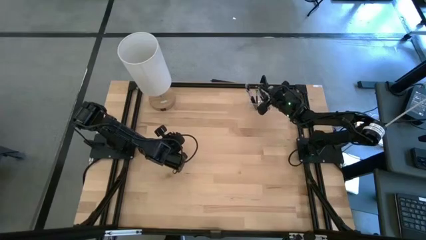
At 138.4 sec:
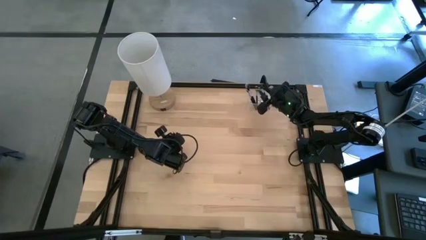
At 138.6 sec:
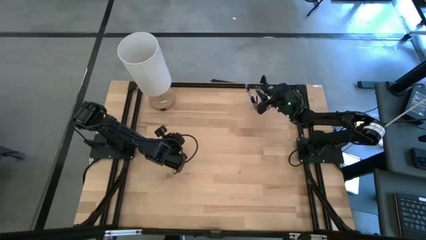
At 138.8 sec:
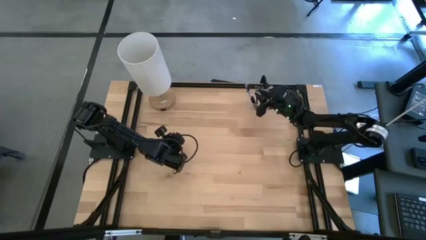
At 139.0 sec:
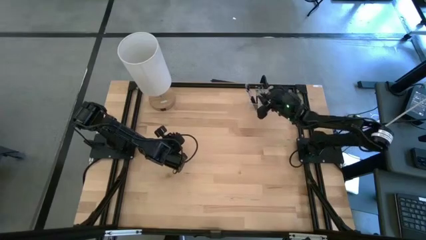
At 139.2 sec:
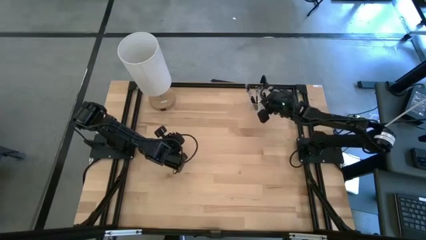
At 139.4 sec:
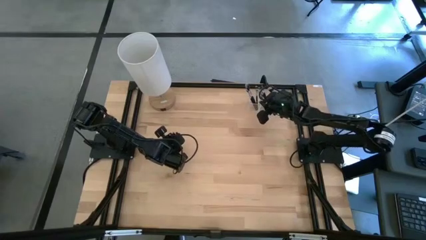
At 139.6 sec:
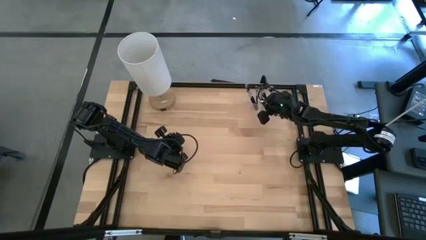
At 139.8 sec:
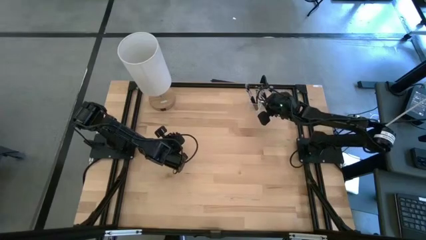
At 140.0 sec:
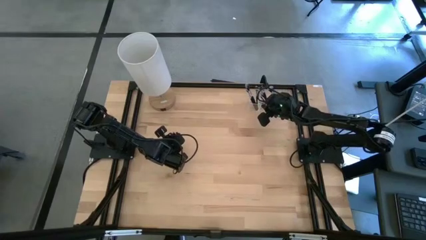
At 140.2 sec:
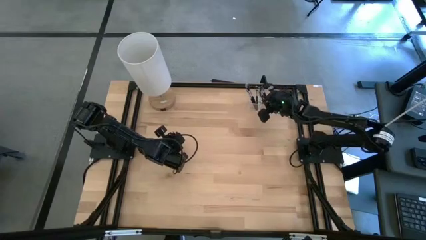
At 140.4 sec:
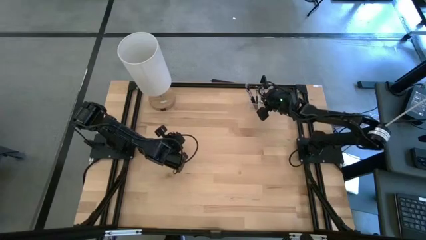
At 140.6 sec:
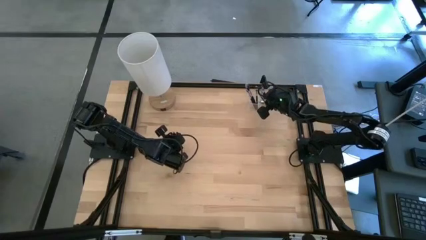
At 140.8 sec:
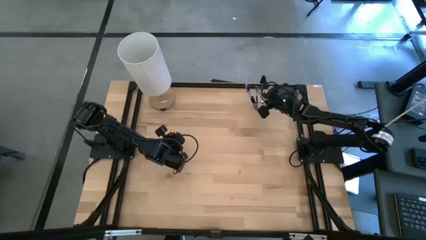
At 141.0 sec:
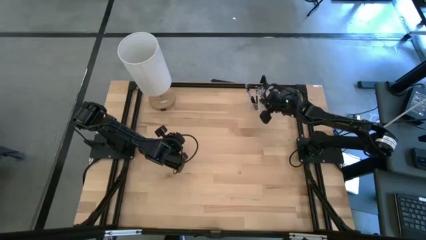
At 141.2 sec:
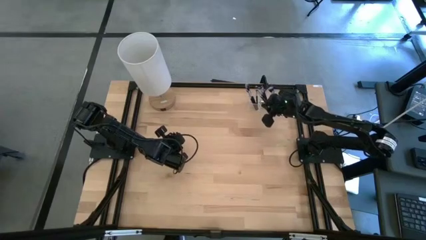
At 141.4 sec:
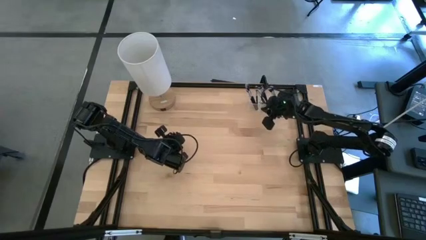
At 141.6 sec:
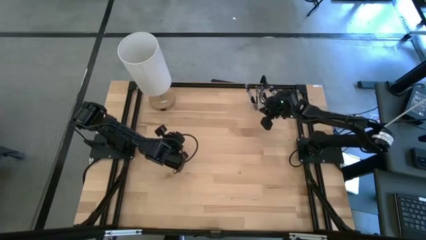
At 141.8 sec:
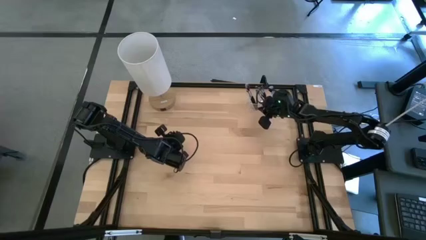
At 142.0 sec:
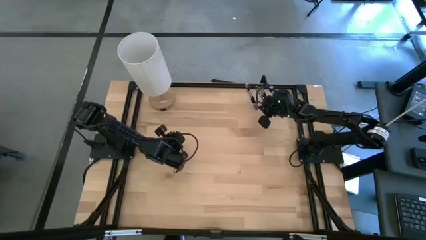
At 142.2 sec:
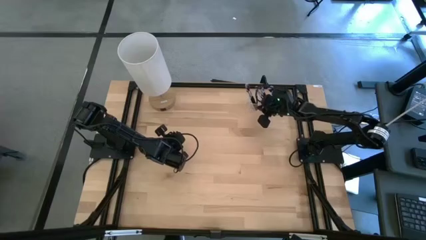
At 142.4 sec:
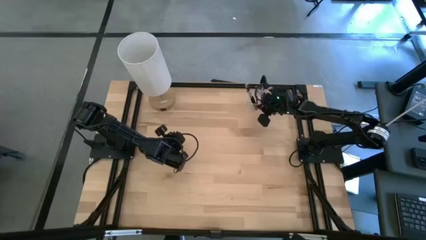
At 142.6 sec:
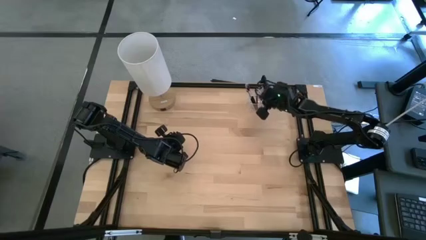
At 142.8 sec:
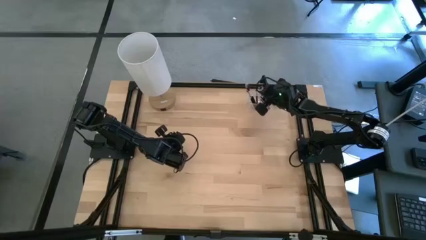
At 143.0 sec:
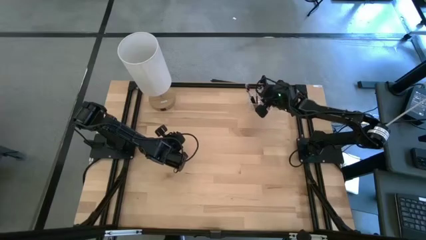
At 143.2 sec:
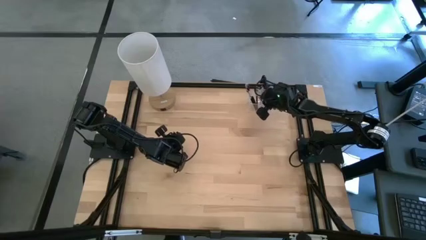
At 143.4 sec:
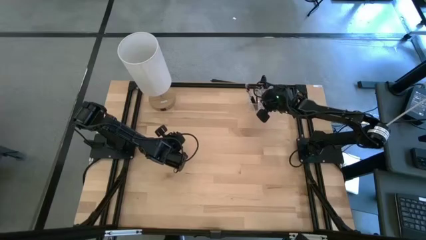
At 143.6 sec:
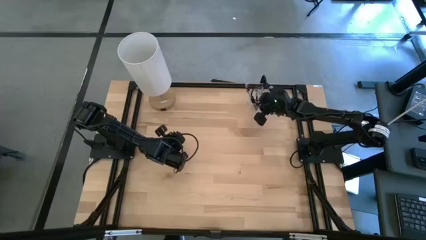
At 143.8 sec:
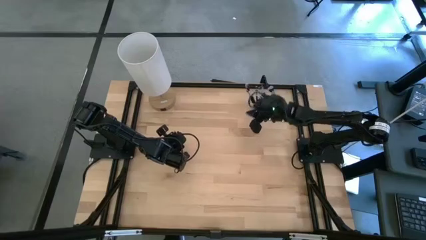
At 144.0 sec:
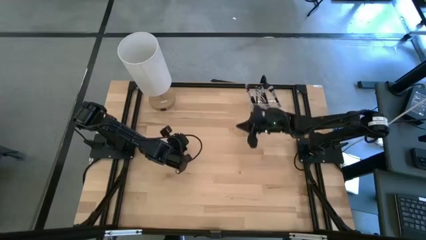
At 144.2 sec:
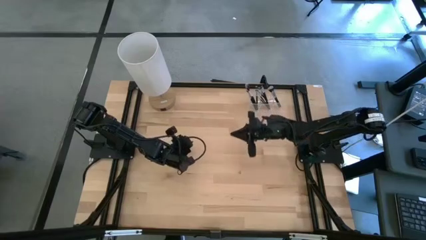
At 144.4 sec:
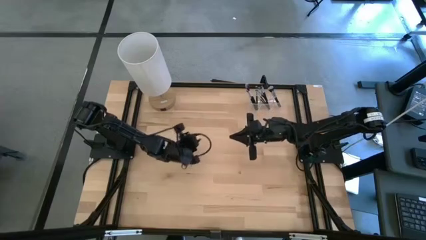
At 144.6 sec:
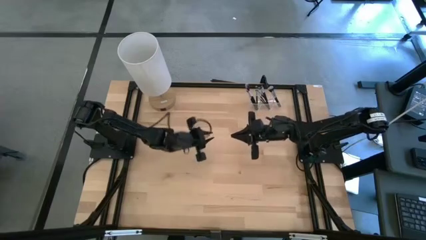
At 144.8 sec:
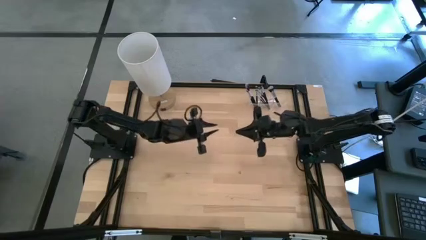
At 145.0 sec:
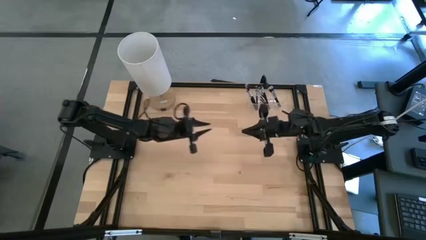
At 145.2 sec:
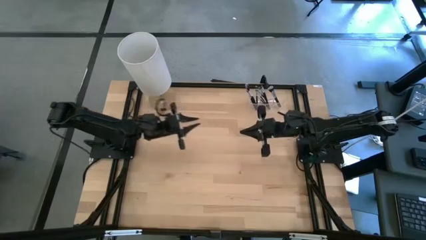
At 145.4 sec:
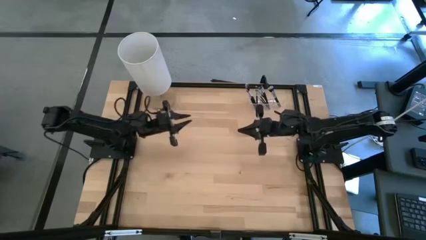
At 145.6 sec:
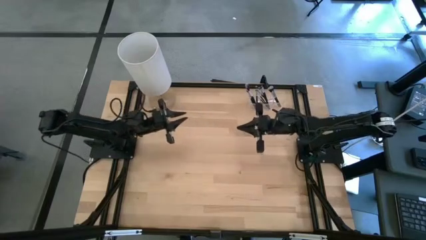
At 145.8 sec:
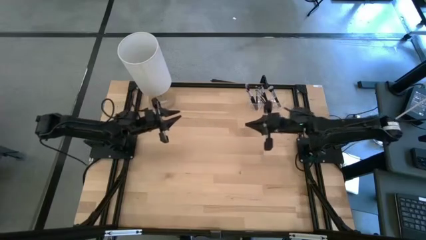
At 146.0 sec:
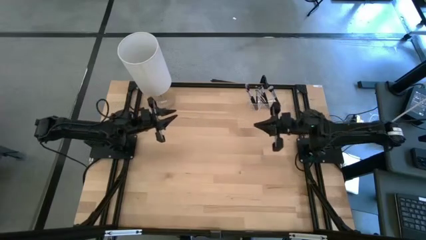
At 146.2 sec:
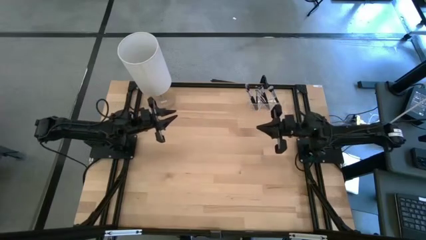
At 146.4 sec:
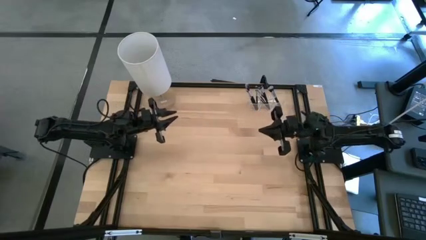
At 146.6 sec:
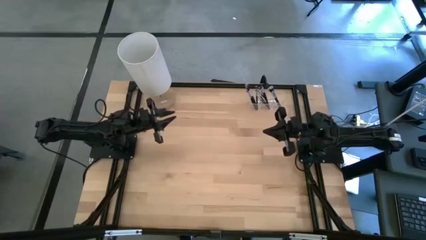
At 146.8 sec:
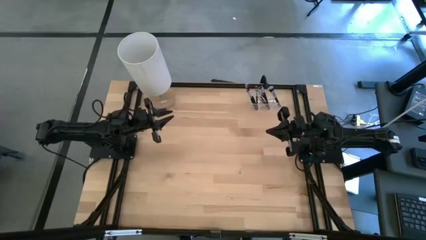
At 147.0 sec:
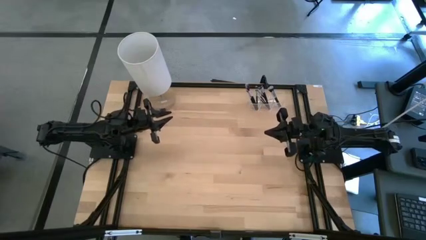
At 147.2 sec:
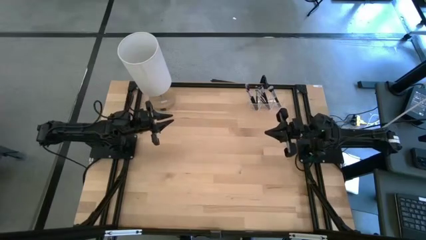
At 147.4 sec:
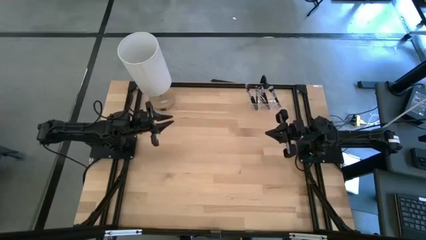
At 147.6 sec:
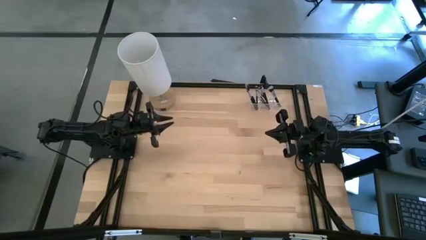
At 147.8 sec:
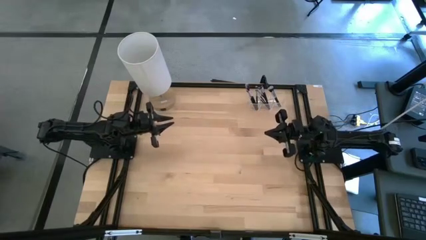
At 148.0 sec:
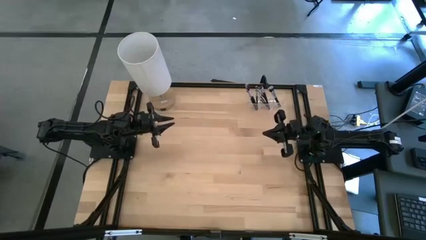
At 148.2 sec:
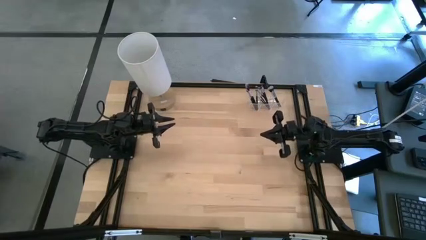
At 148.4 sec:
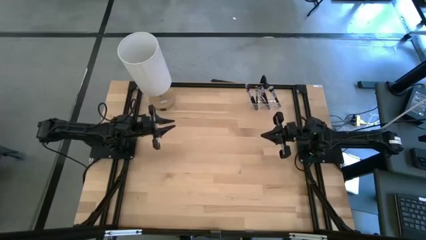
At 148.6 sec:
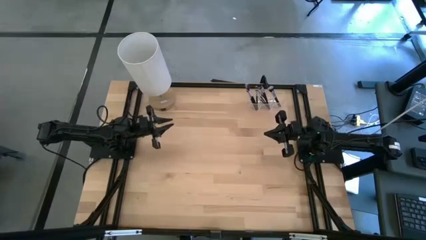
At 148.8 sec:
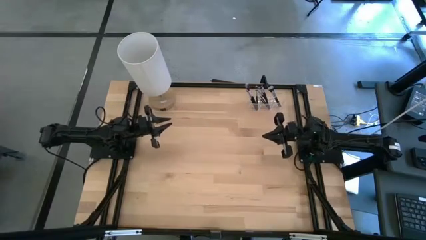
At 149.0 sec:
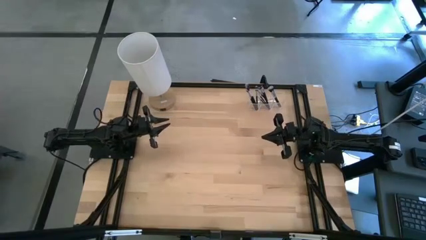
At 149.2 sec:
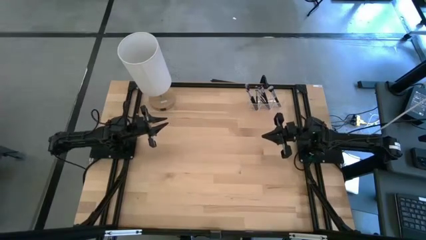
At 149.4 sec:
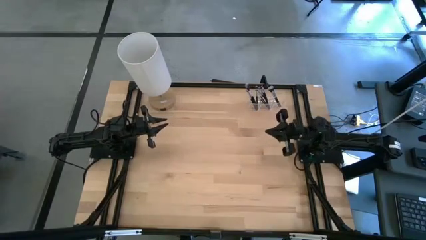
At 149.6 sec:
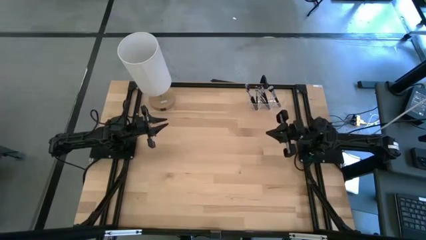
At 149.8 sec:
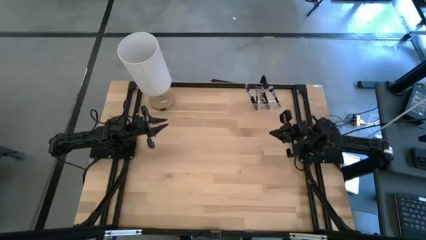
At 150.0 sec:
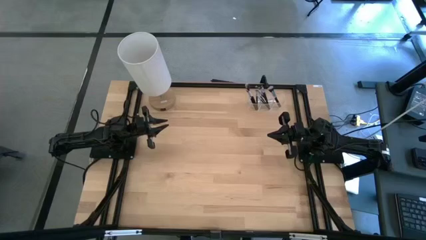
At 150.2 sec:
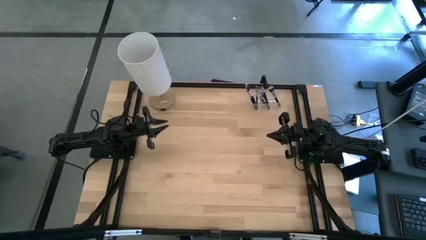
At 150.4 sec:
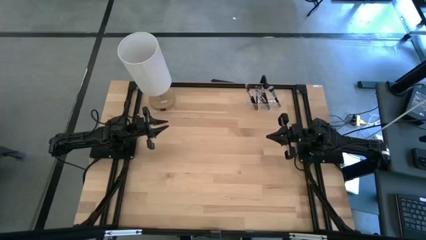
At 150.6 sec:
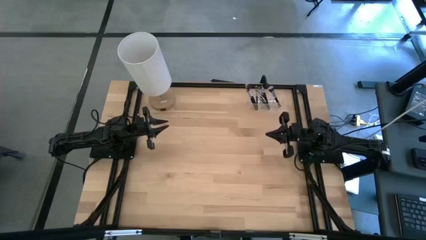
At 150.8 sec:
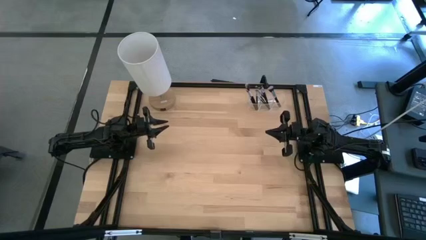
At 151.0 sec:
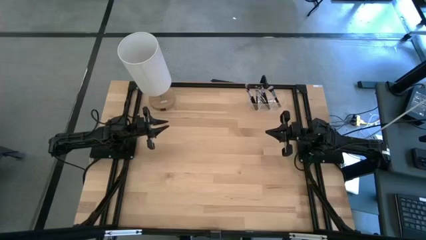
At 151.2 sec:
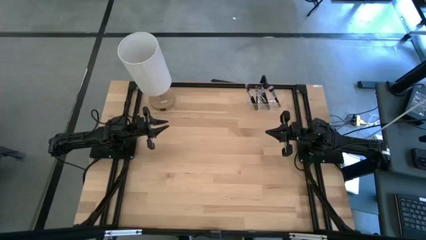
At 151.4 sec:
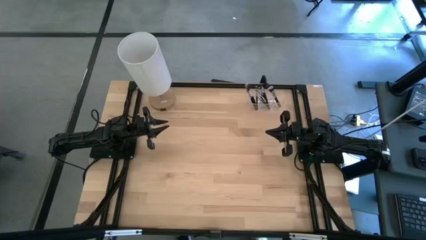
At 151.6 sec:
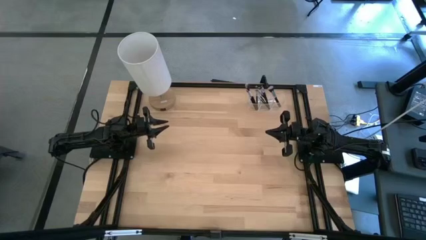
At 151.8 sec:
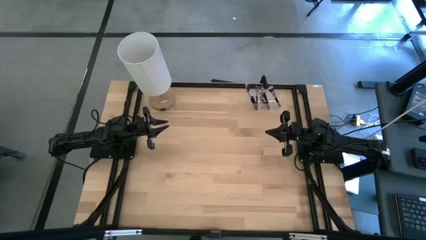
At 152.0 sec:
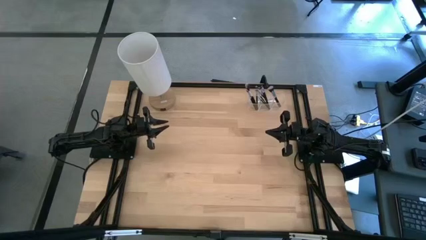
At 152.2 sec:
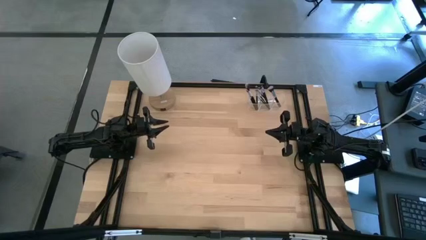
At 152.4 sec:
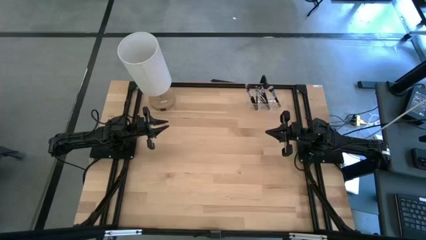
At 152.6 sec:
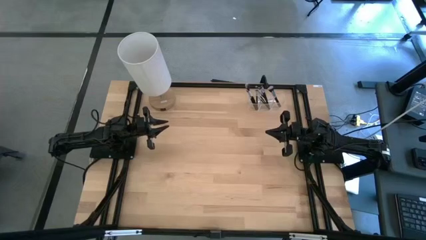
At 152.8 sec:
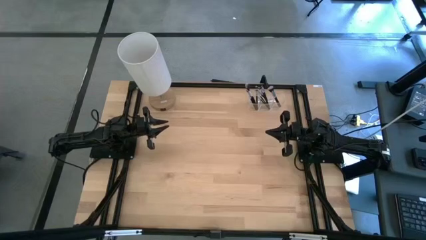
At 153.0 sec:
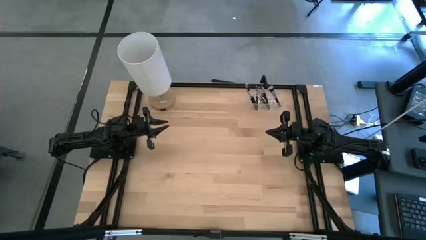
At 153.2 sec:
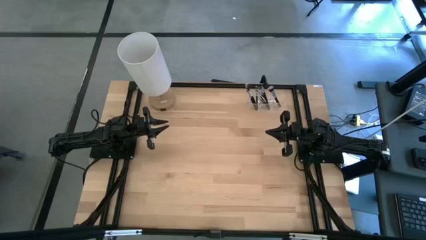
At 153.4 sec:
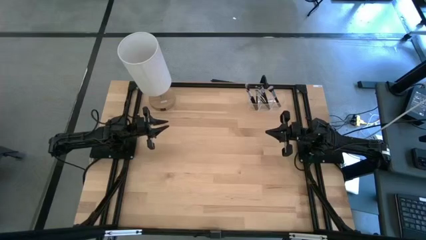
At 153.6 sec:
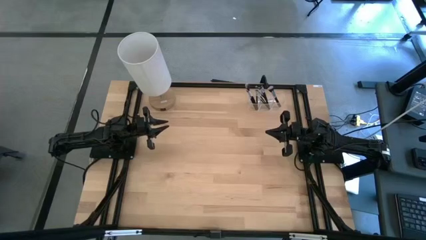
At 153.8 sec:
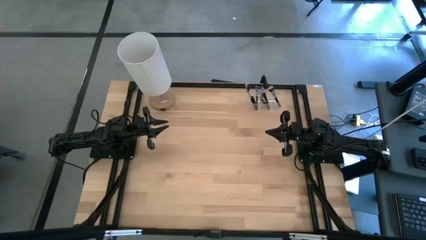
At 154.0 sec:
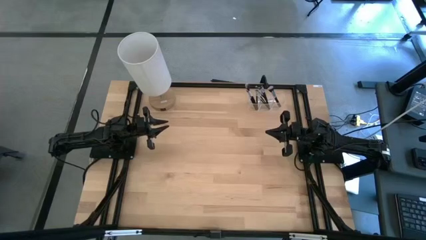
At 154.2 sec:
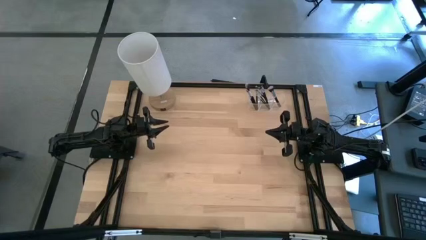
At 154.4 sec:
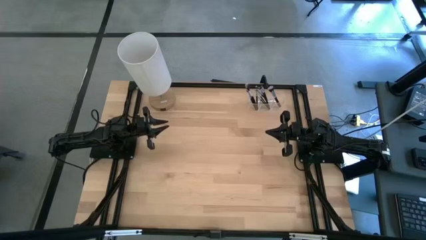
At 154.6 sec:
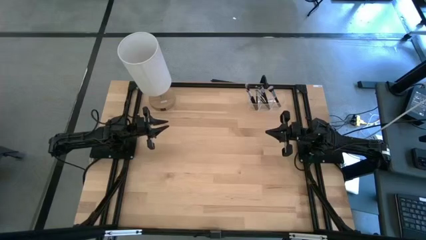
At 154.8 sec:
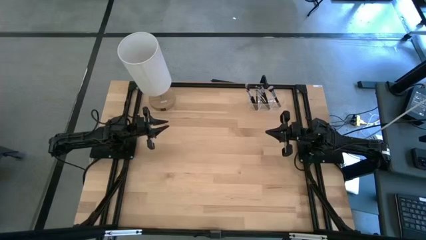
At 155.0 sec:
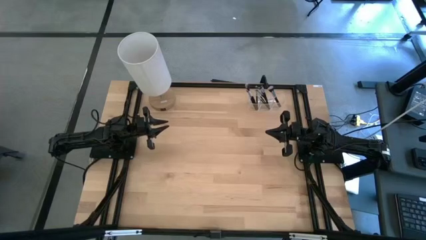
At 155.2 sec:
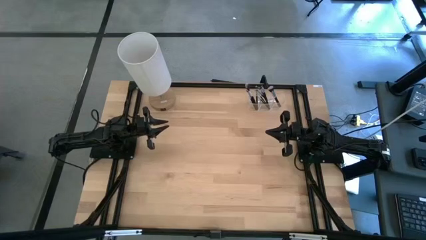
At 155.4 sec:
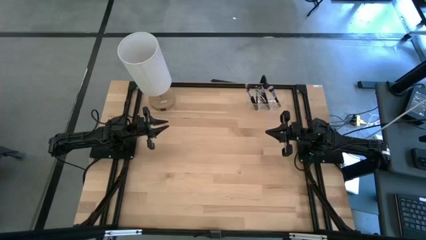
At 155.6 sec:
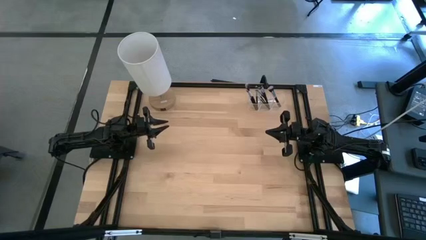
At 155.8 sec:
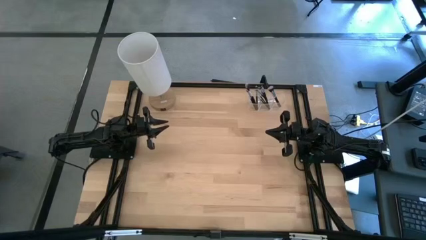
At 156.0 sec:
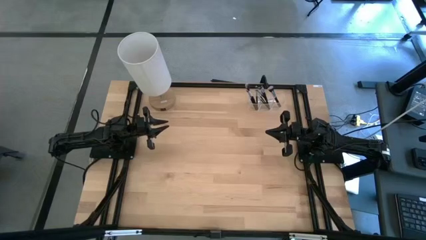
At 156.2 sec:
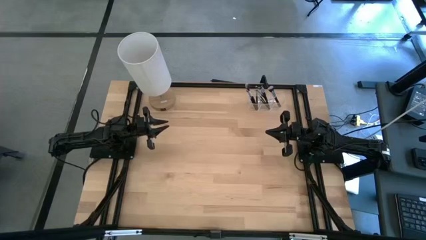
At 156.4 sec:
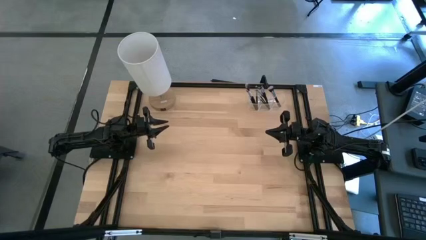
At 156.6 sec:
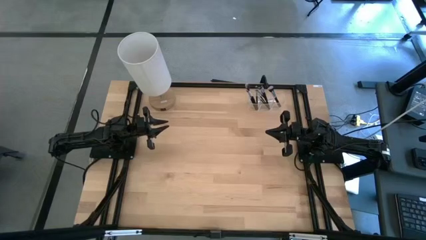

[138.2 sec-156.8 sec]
Task: Put items in baskets/containers
Return to Home Position
